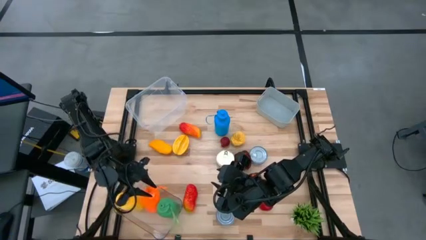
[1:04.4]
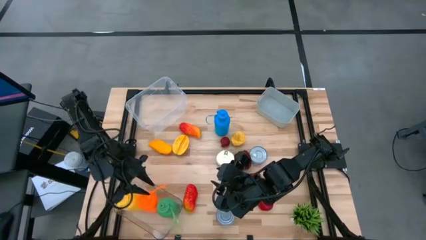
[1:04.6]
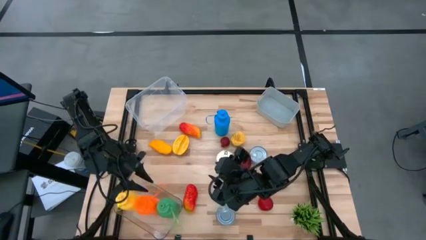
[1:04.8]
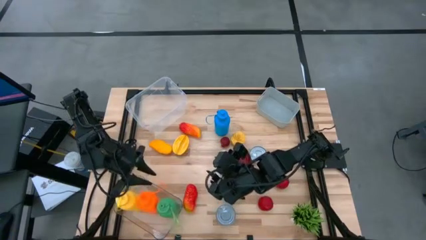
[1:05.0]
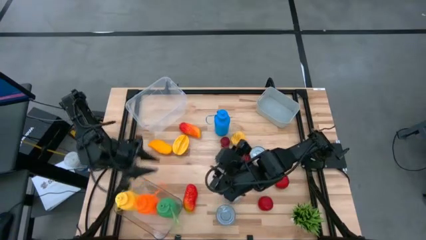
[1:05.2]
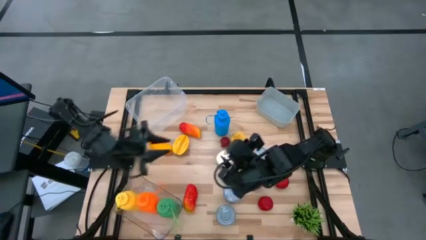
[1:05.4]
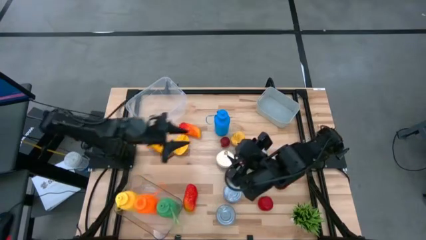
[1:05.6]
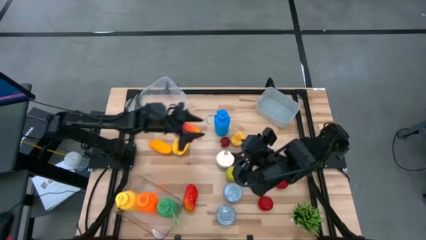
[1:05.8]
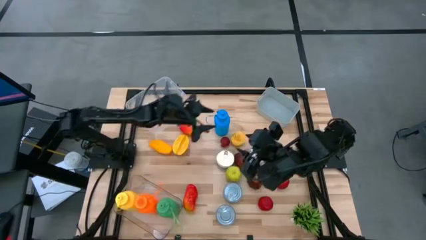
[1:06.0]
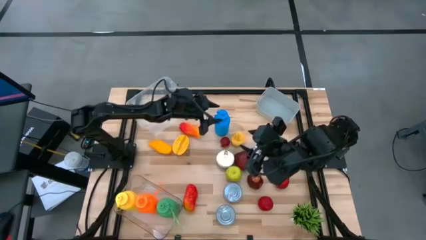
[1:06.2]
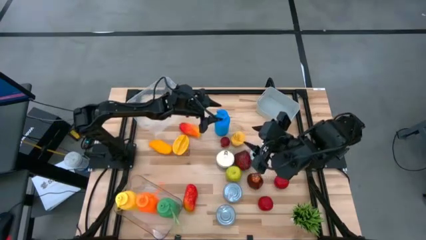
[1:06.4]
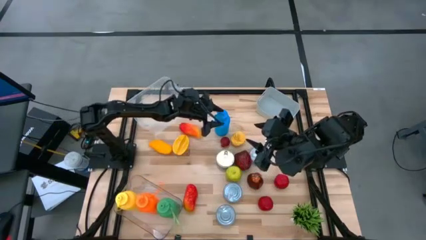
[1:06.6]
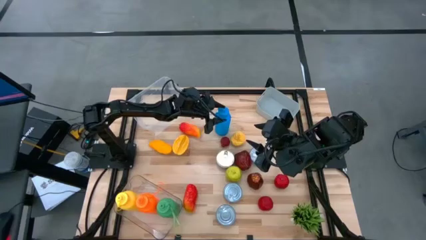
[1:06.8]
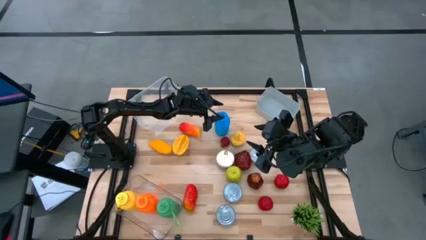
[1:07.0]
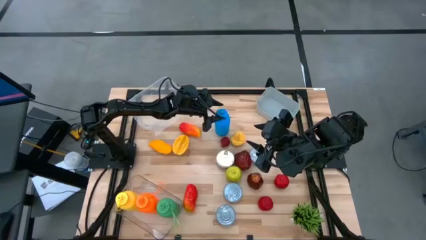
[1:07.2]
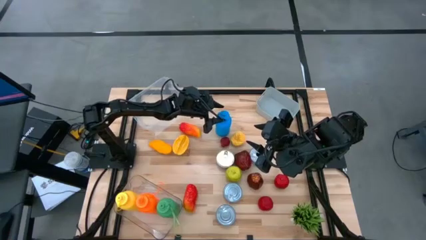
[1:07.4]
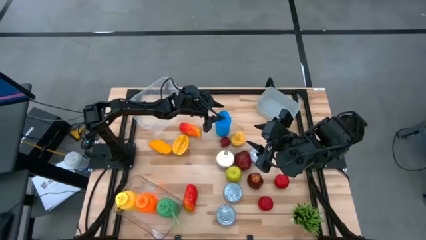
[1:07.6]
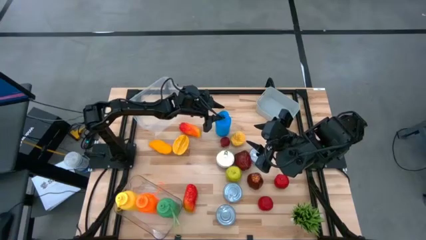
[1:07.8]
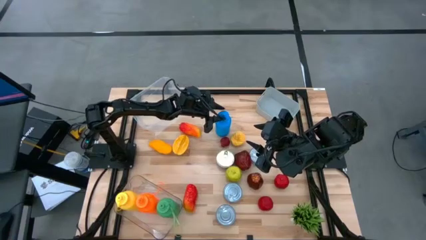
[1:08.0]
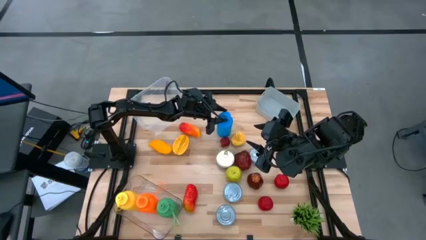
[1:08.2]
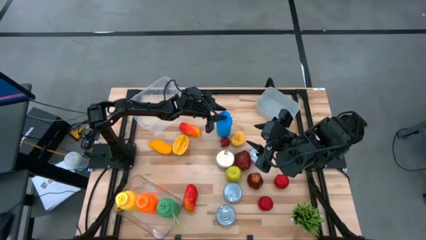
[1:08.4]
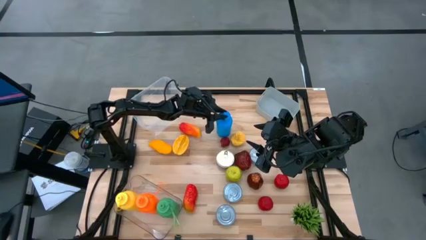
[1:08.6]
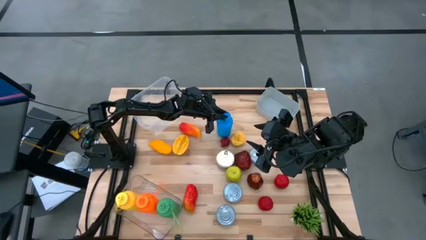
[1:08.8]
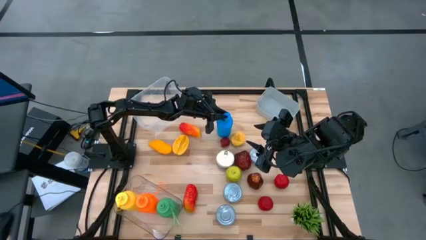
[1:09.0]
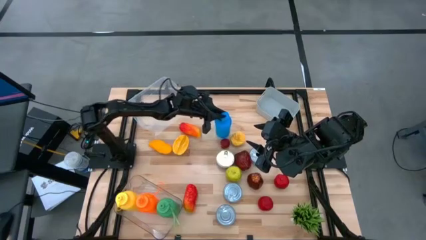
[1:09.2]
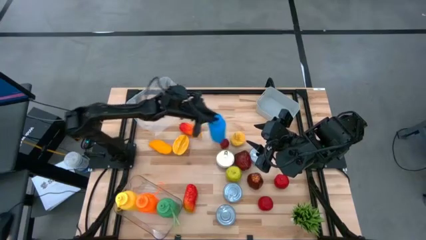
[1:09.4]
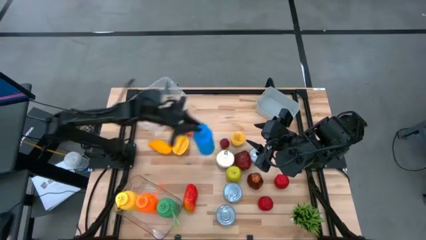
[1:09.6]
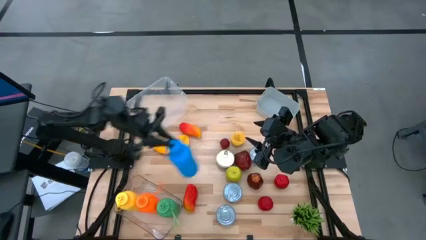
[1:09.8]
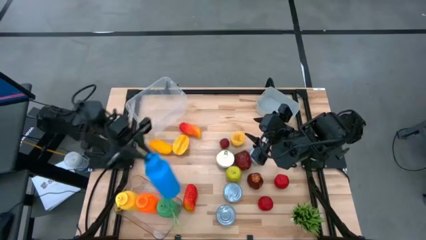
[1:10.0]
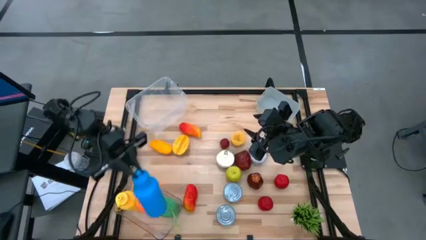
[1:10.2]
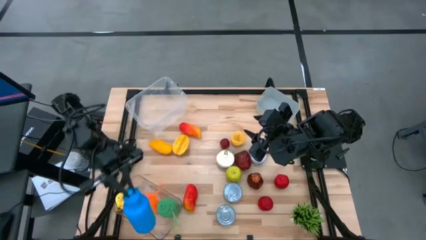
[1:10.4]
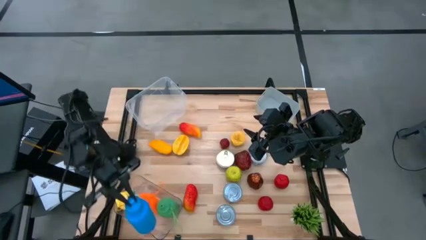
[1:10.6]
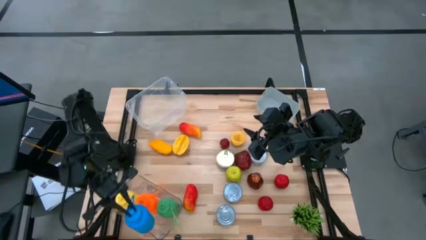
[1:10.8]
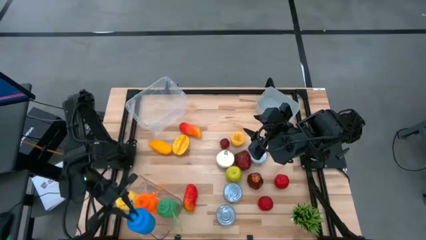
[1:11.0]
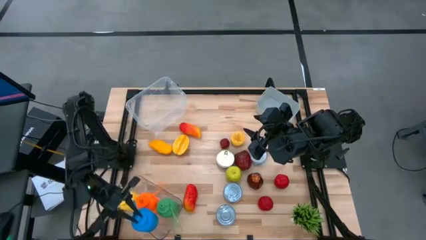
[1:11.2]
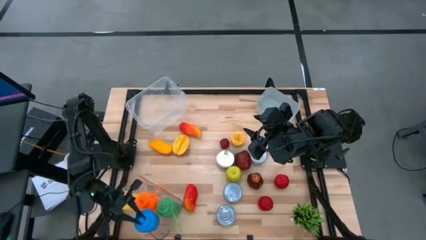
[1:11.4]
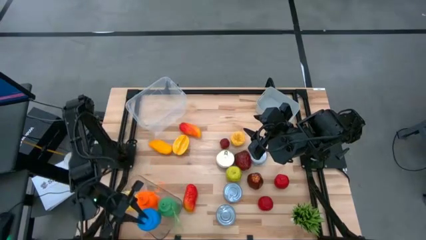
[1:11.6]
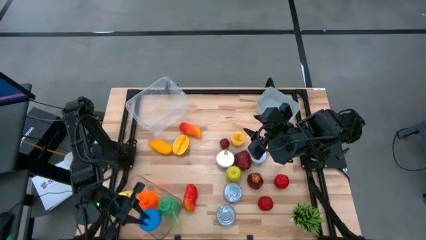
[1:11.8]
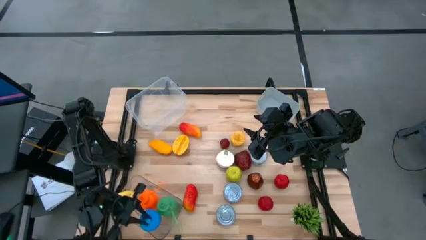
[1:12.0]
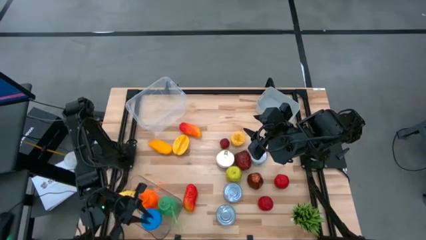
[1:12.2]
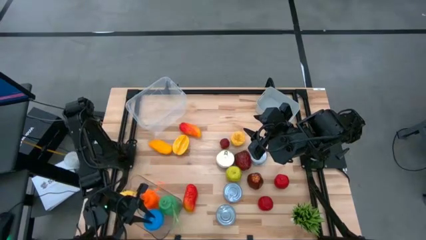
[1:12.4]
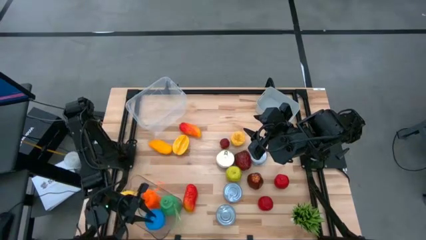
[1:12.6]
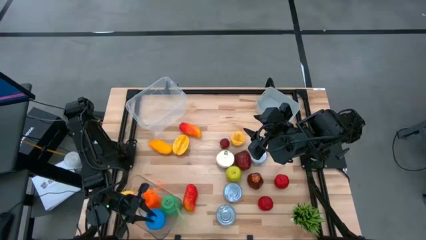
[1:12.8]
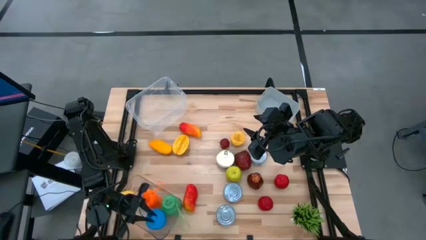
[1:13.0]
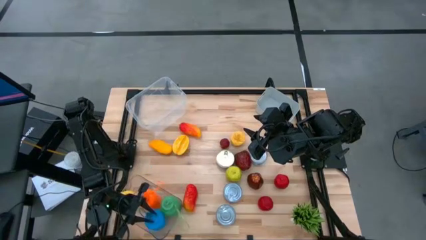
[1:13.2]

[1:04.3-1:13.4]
Task: Pick & Place Food Item
Put the blue water bottle into the transparent bin

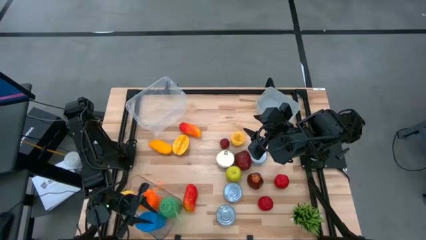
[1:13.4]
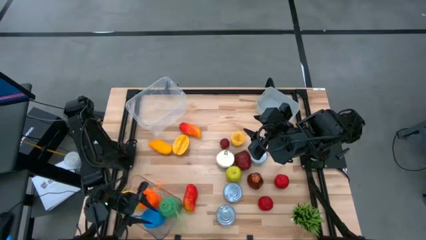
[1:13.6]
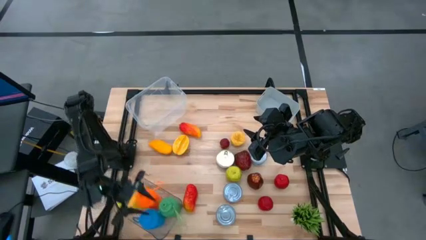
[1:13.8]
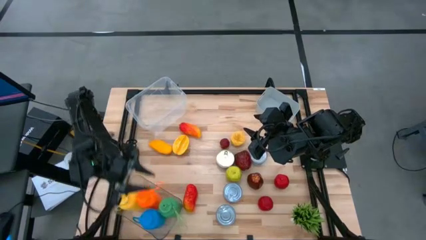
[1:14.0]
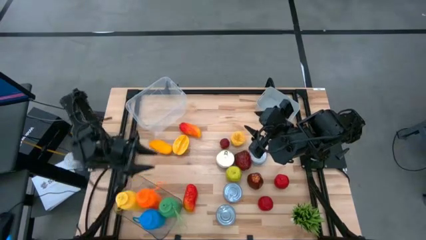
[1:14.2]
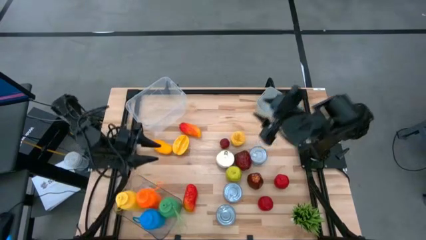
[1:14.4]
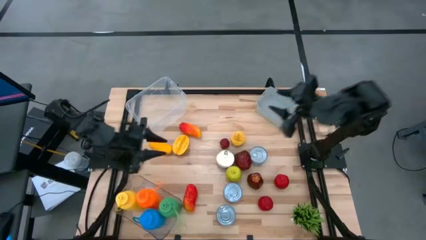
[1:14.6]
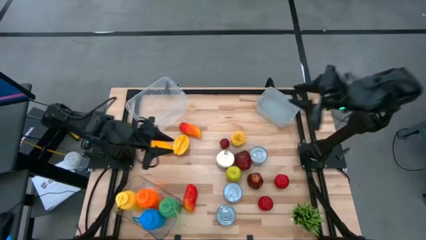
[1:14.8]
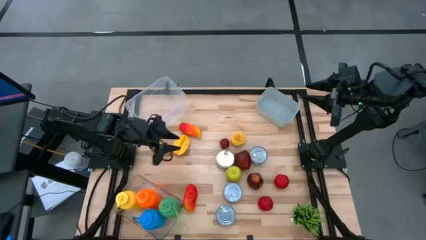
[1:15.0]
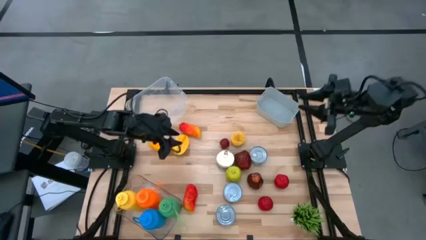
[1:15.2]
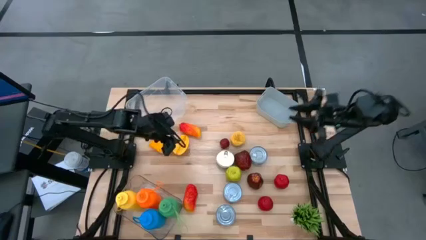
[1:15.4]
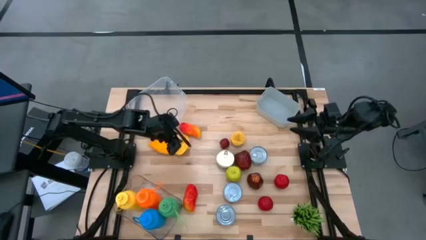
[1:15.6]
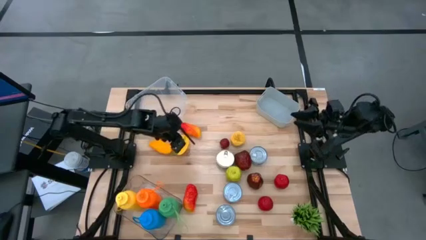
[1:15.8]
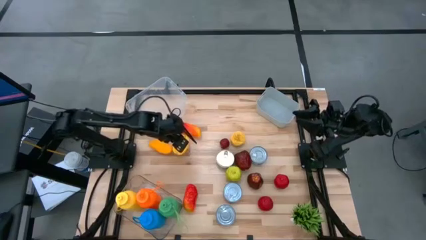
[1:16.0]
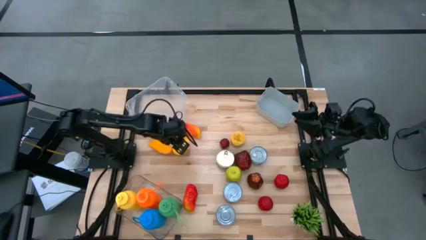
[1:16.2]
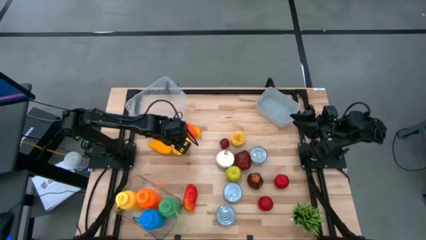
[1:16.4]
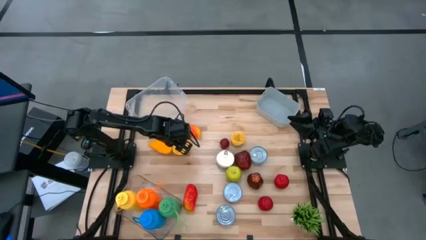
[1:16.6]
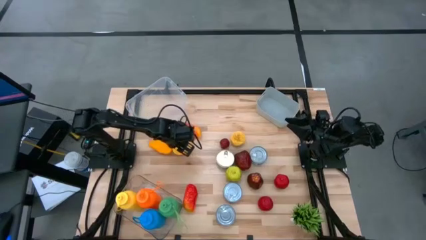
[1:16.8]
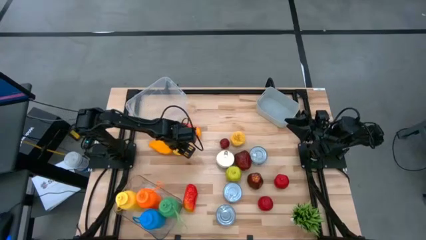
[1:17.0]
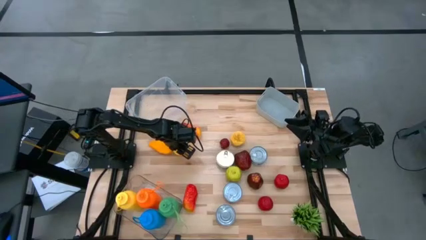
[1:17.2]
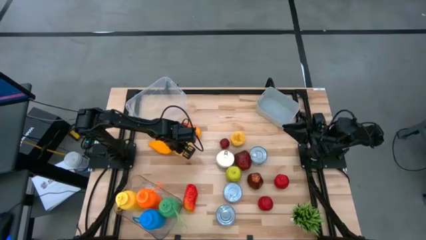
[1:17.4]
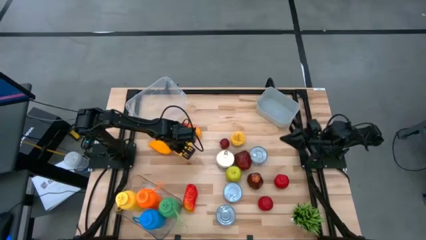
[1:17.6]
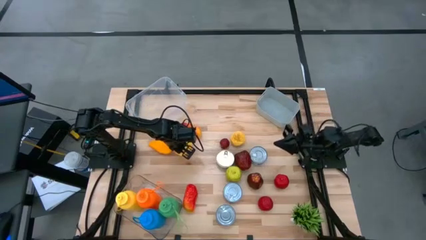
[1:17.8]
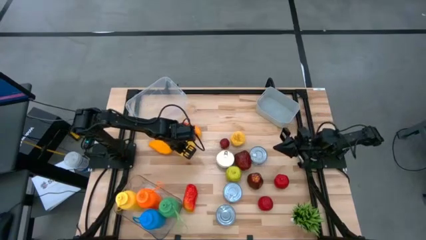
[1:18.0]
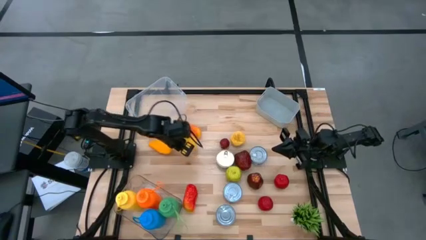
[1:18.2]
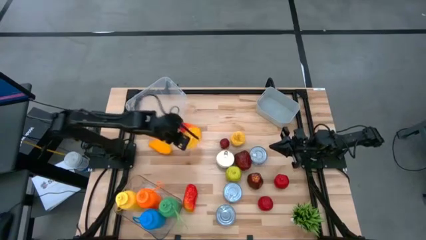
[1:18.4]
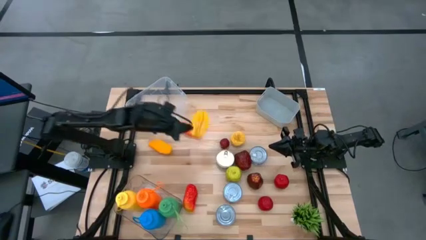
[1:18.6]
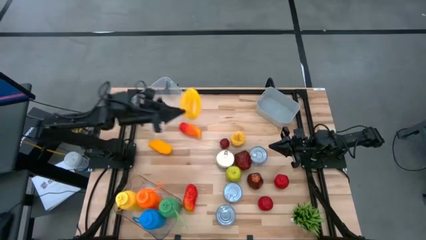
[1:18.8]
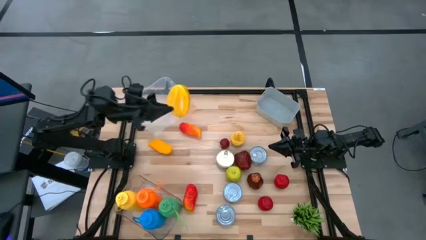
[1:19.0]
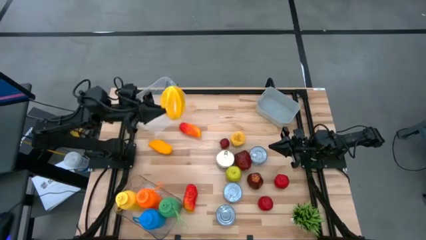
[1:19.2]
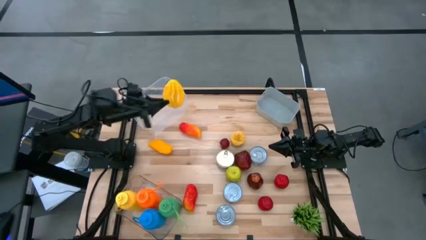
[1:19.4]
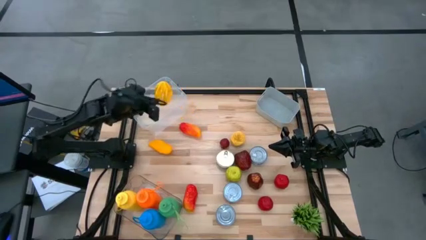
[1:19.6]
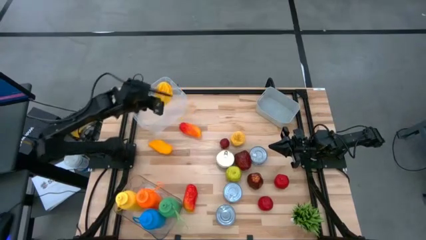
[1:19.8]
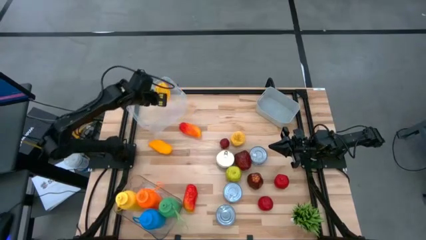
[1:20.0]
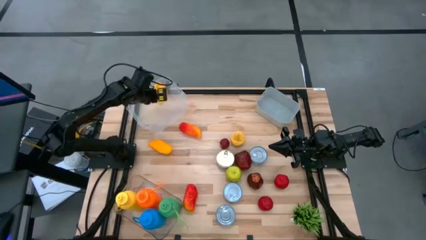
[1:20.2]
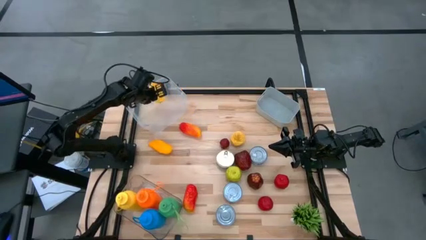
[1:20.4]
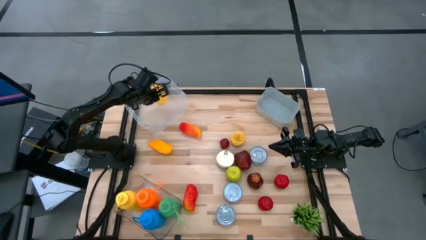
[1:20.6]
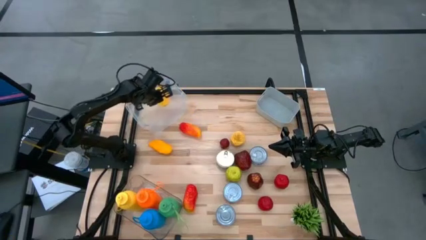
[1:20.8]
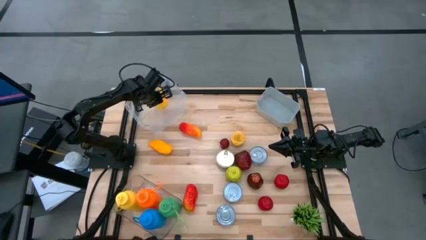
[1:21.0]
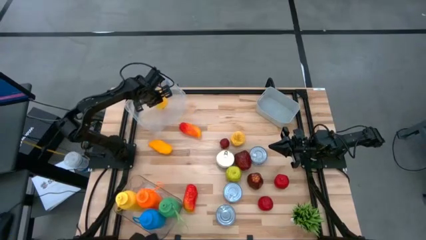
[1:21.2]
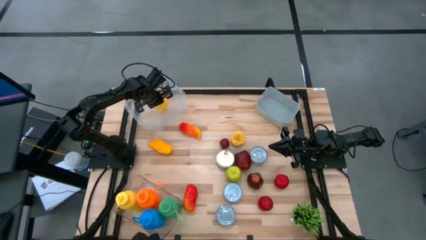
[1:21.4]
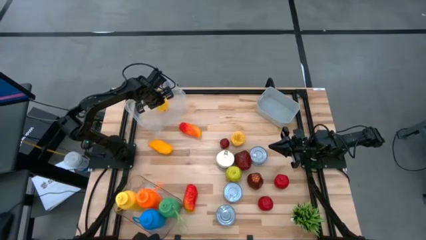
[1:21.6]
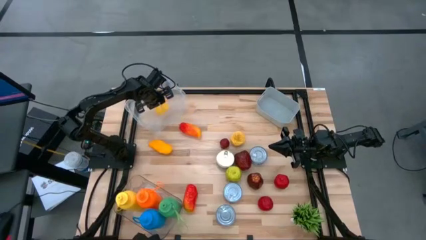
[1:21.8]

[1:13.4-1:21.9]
Put the starfruit into the white bin
